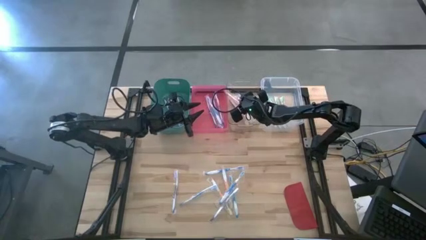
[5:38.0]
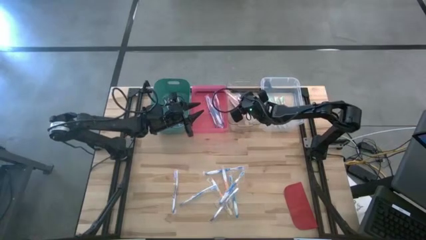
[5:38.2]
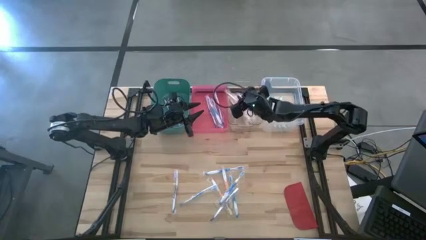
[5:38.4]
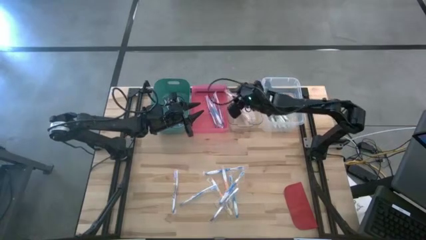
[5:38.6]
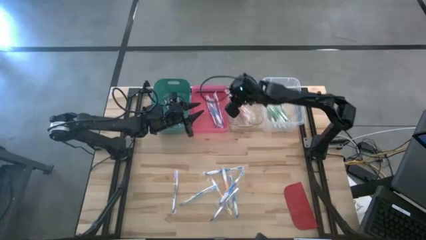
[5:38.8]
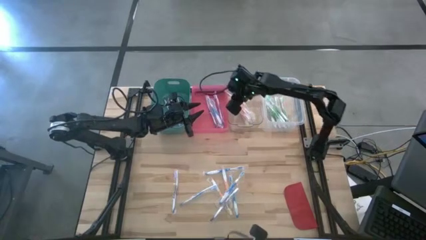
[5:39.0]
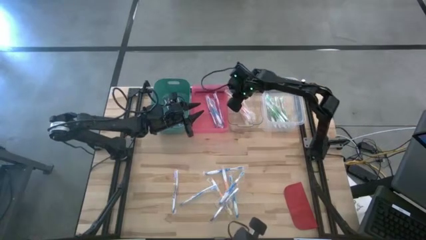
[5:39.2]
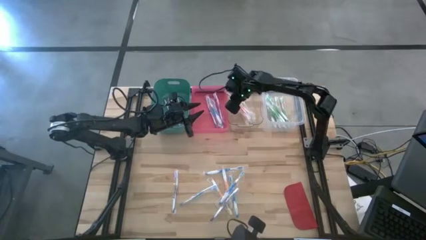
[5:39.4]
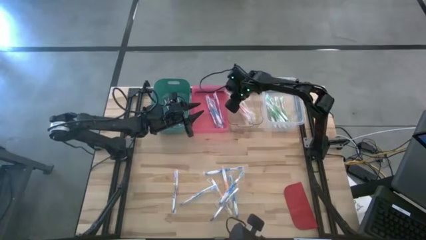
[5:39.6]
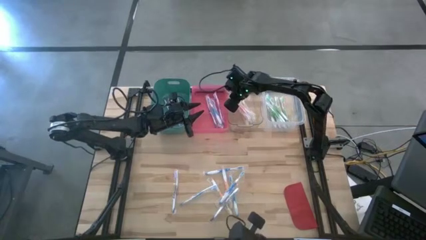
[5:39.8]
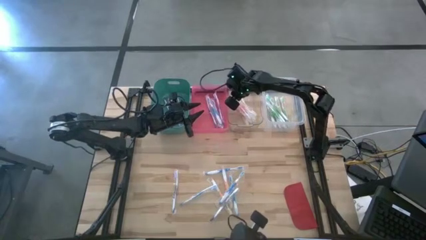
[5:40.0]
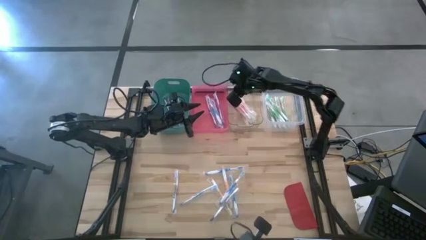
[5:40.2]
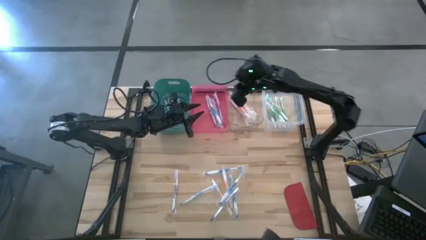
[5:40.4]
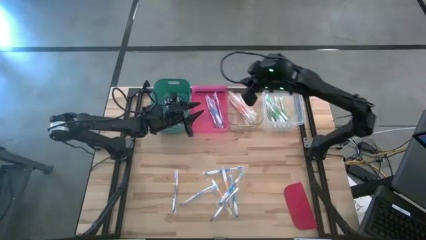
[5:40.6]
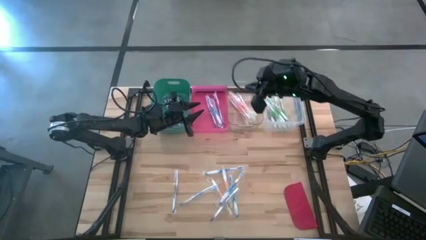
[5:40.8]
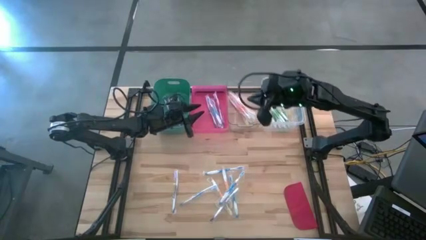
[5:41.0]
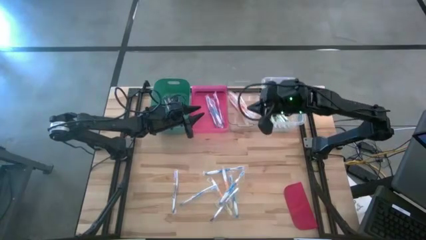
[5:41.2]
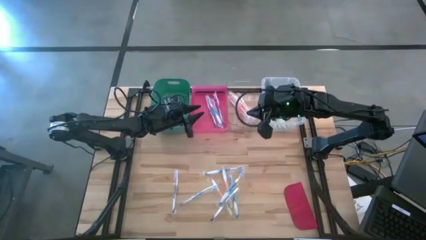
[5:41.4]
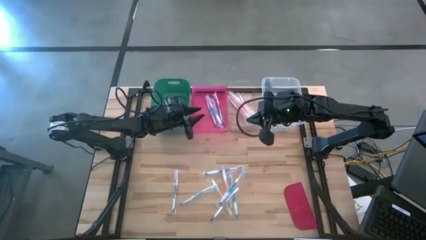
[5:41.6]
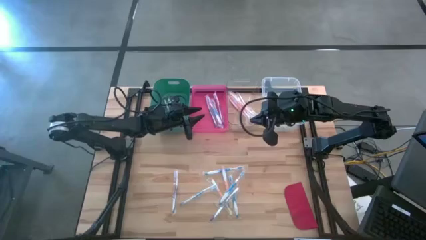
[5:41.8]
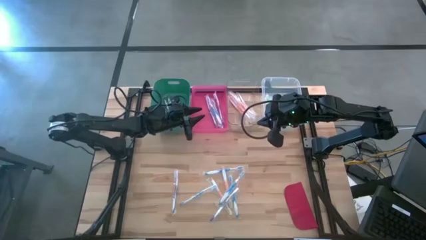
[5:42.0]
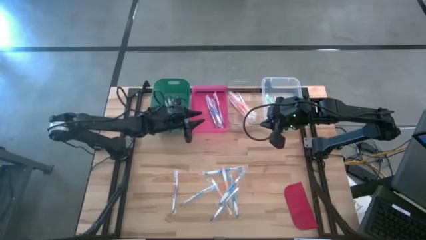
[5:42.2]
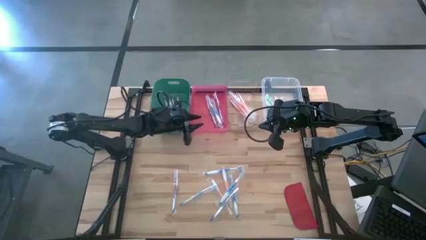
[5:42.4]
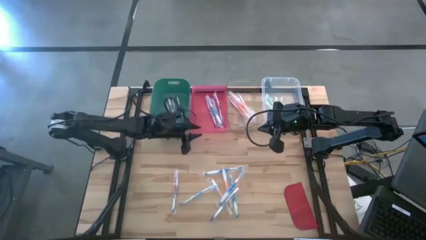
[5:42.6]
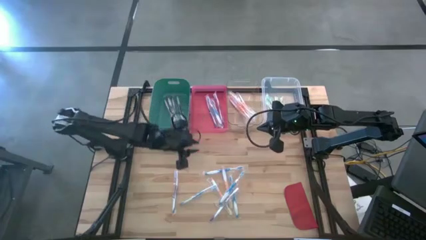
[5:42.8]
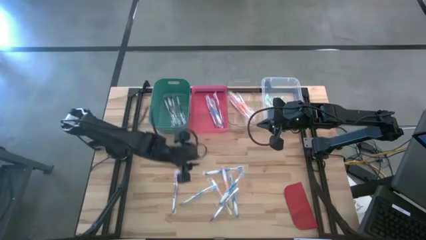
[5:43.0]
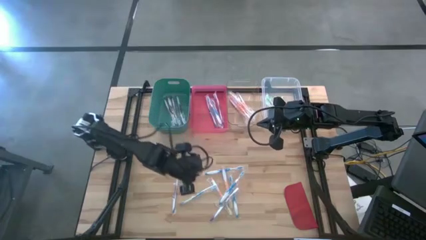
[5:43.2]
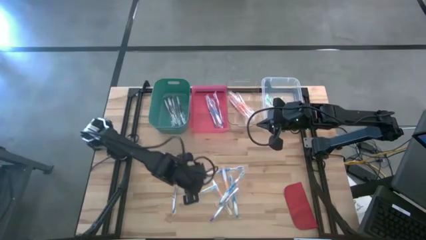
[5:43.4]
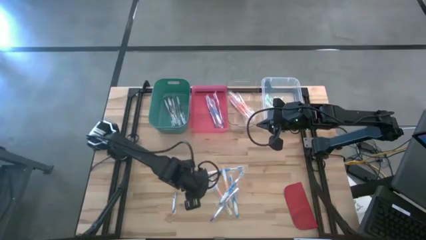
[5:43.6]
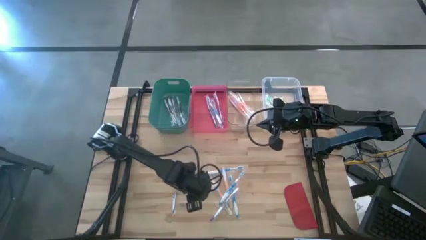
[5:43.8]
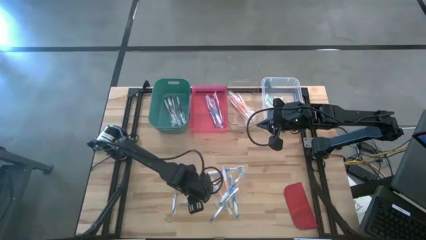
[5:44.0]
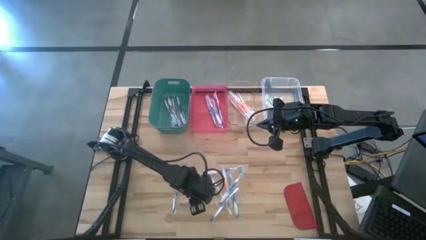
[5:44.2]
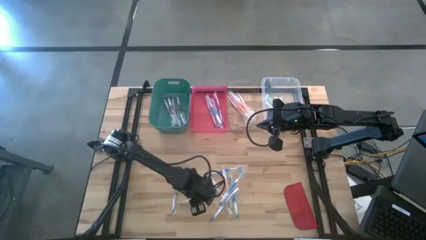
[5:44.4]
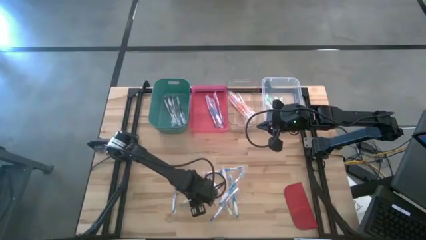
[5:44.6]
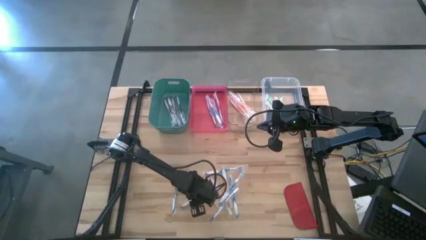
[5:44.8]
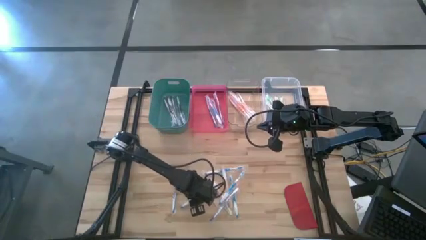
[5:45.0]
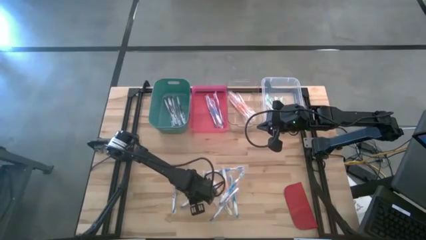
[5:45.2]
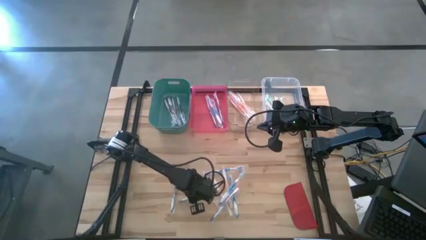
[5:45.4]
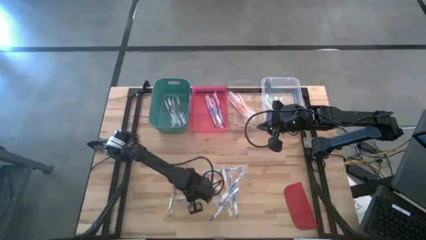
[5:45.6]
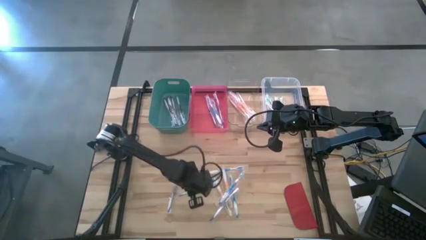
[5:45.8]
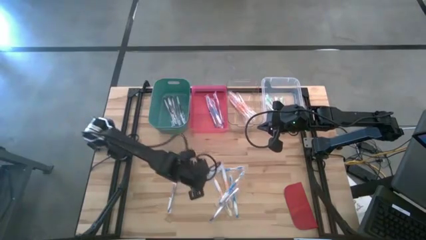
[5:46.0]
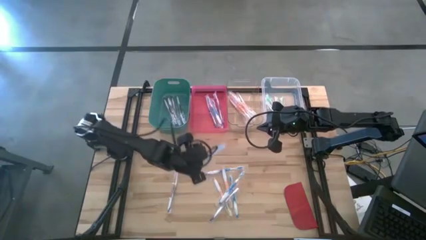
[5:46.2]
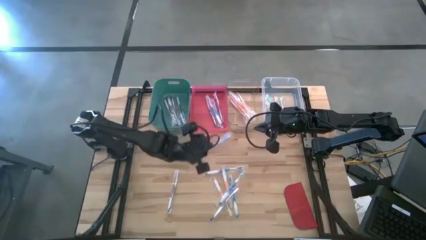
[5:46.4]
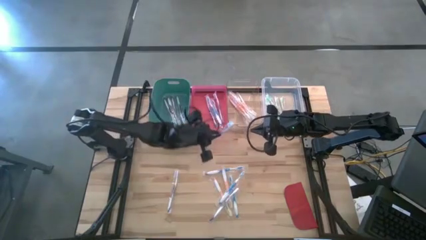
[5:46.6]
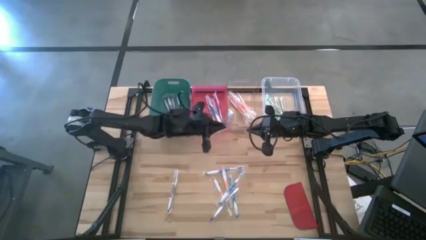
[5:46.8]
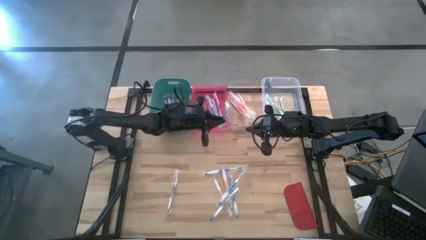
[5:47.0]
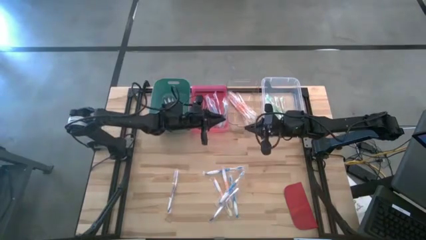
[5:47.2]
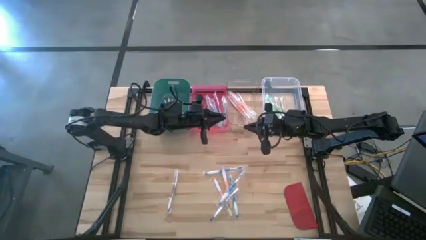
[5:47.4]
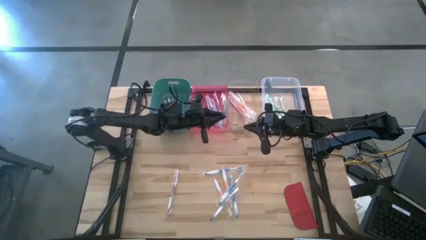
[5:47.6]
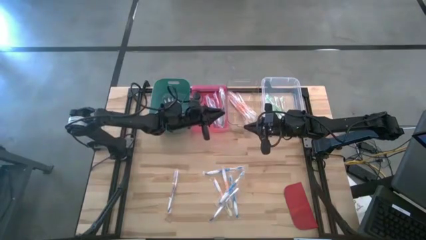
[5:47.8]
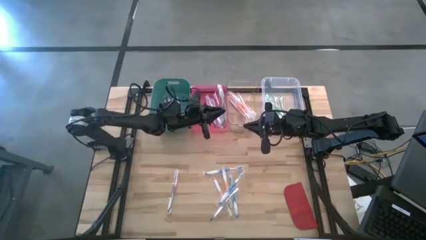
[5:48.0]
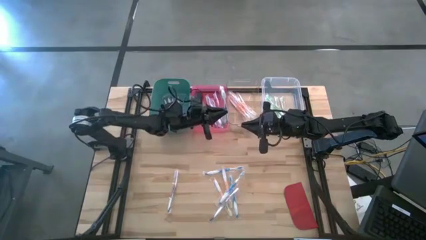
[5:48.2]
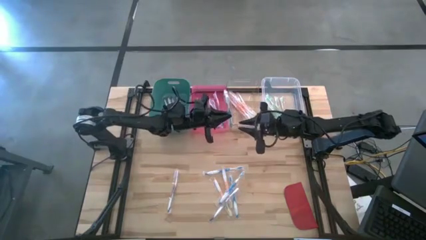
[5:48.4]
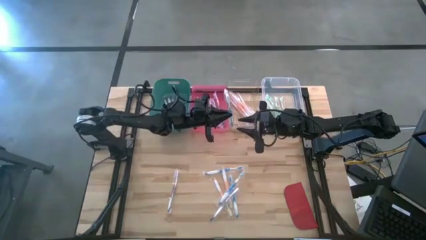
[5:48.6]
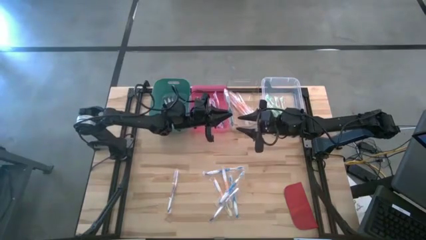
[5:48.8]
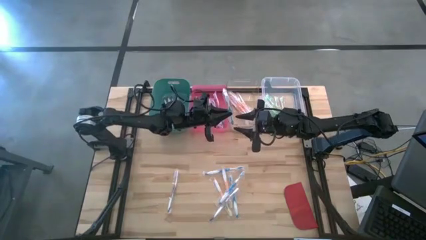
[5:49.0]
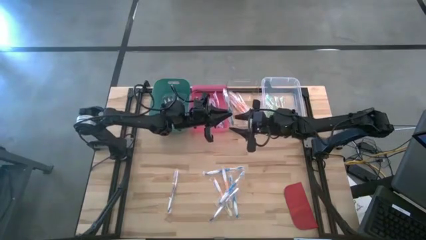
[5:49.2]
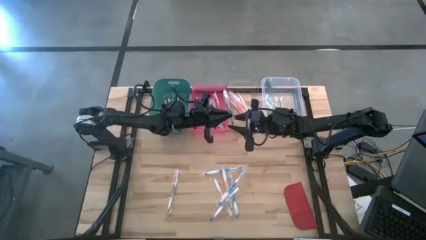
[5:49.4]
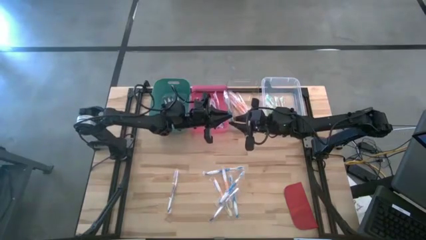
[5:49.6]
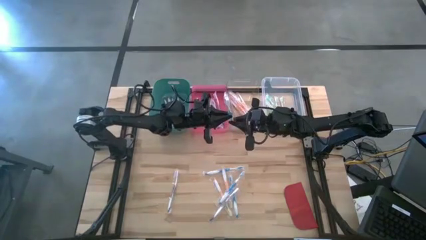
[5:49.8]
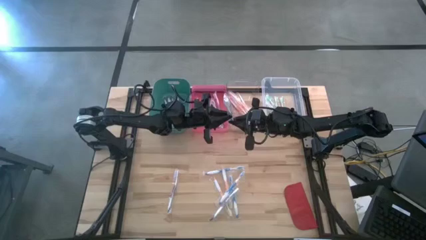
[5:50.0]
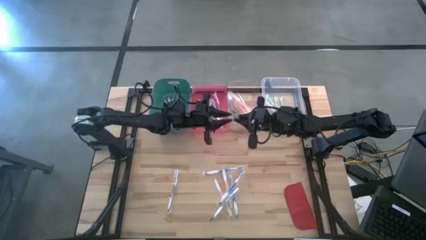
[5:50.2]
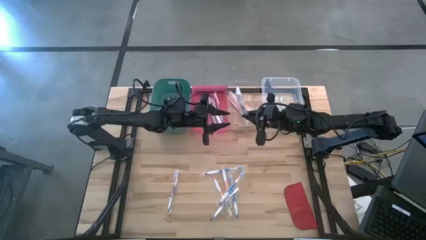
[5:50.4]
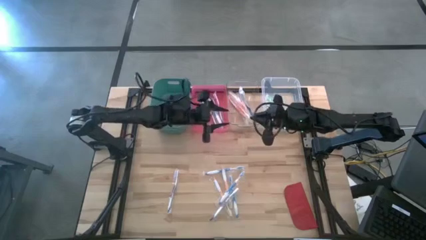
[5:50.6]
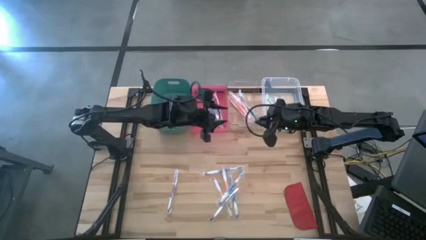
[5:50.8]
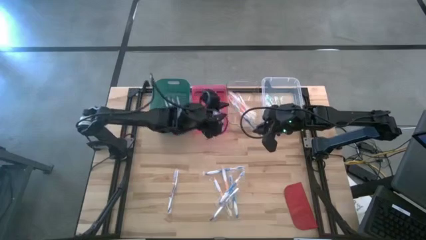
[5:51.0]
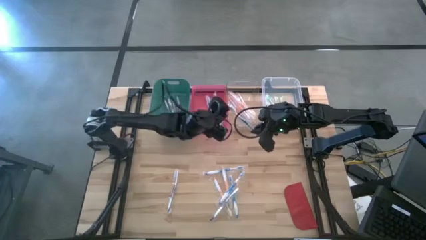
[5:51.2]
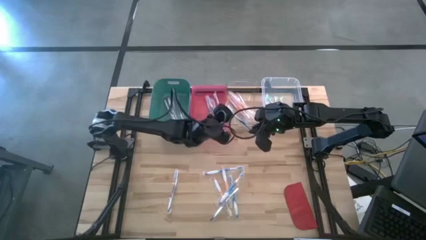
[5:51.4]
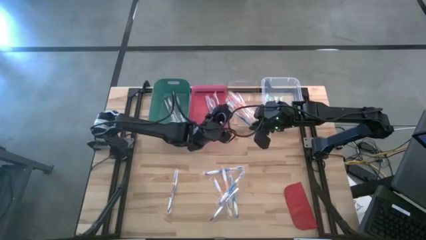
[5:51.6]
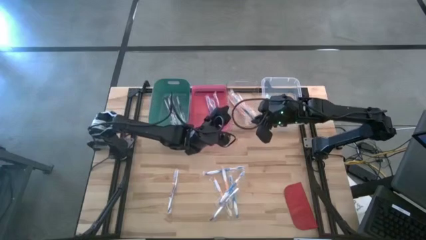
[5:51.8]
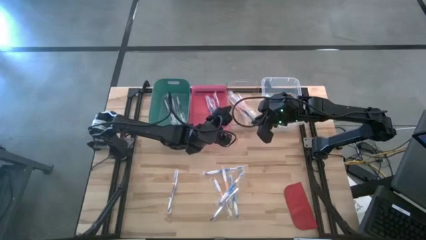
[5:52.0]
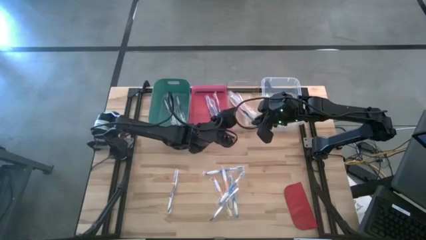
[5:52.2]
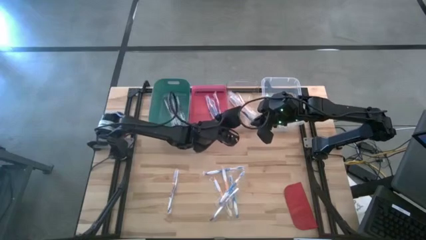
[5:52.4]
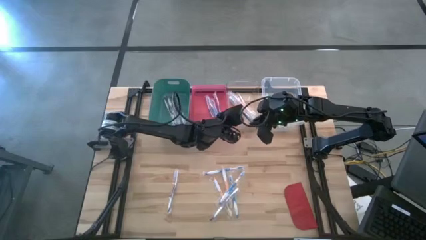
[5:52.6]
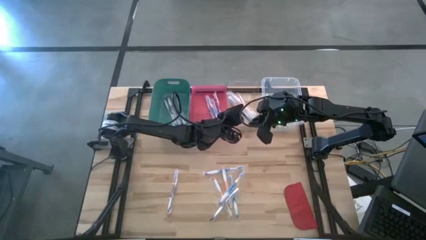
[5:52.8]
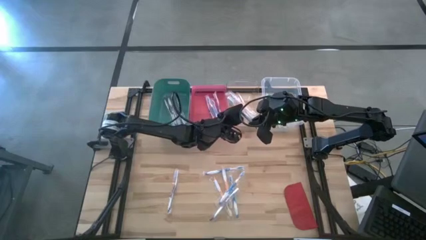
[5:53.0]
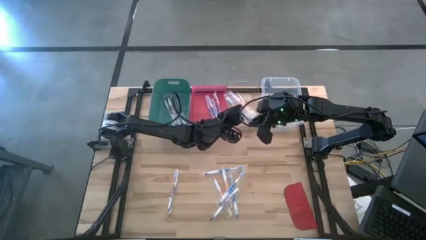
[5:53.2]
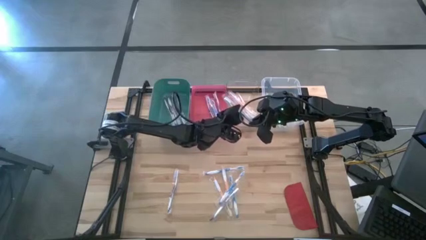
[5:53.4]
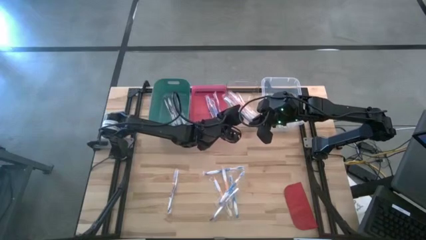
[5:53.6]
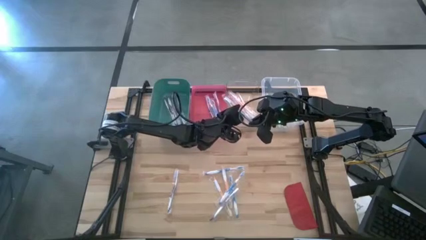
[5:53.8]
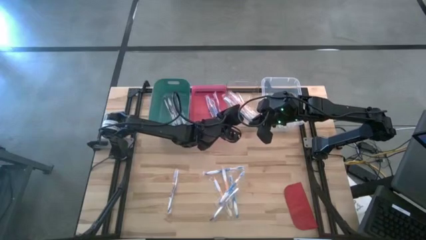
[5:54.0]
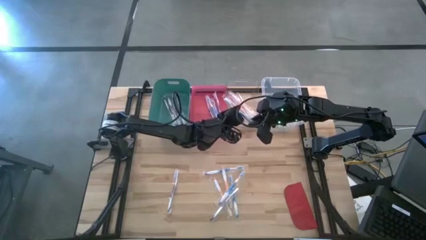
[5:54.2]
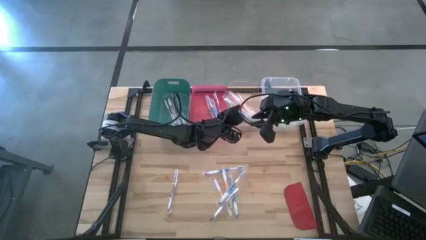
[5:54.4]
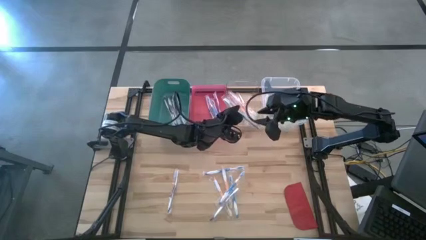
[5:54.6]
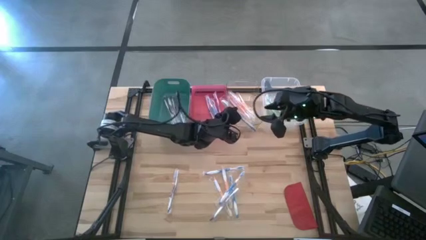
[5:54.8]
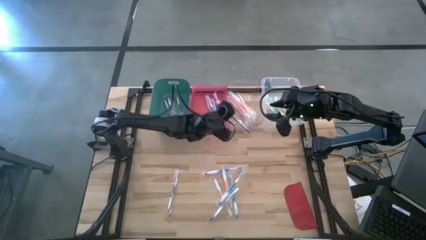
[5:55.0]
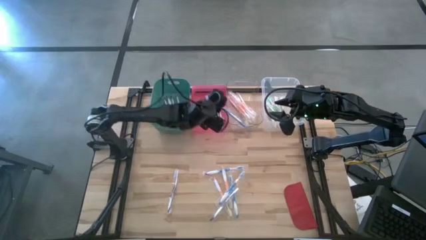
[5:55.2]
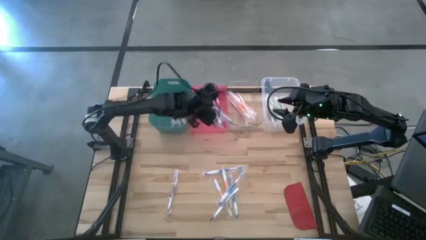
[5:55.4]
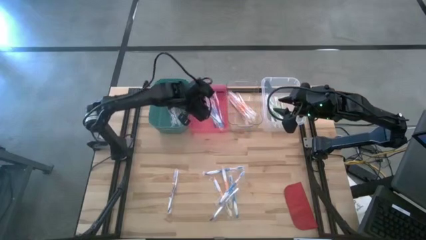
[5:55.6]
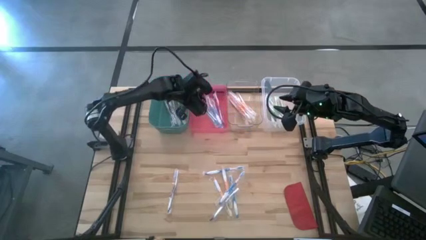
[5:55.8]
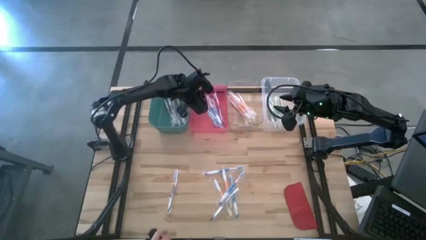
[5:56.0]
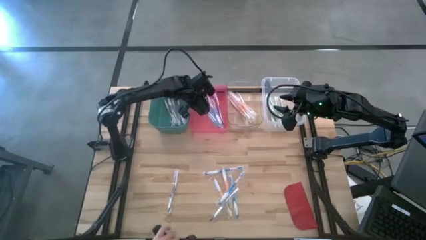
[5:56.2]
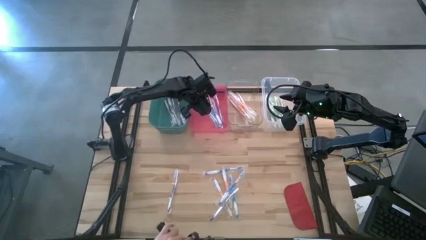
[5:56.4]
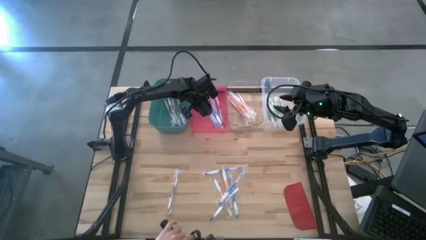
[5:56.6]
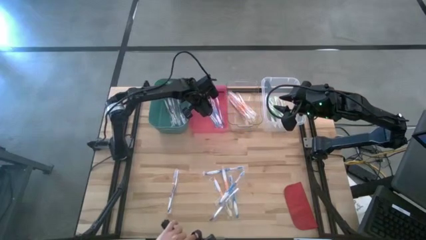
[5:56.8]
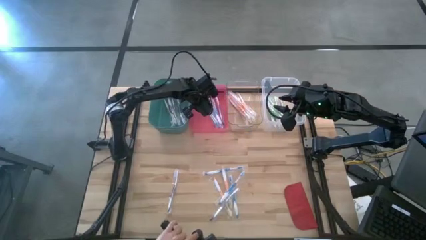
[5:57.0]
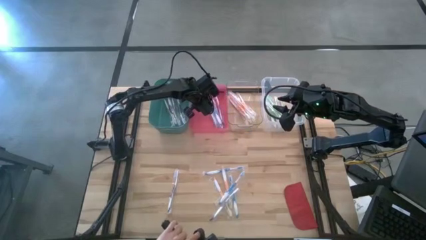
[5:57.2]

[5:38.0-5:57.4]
Task: Pick & Place Toothbrushes
Put the blue toothbrush into the red bin
